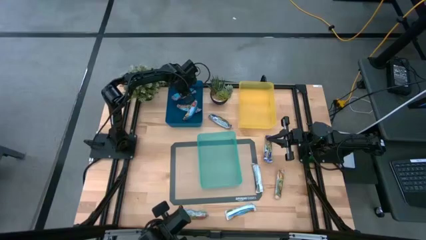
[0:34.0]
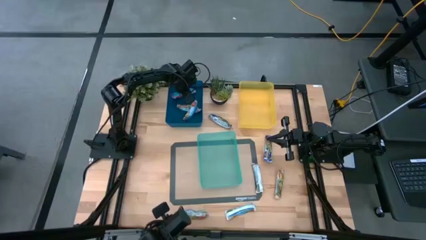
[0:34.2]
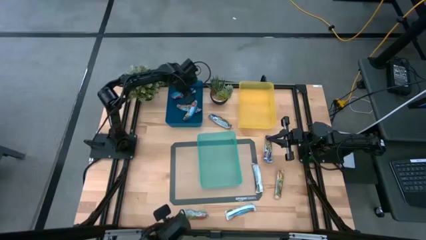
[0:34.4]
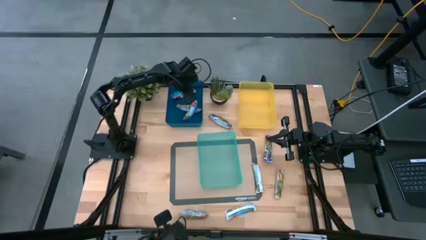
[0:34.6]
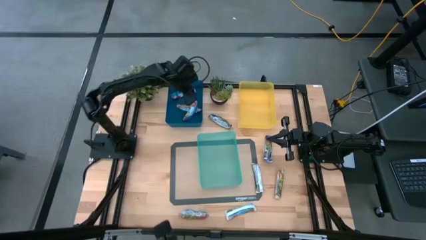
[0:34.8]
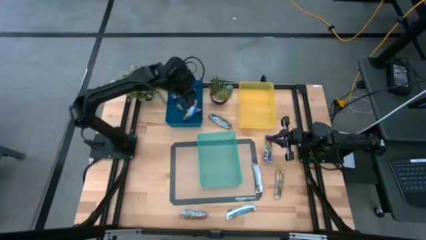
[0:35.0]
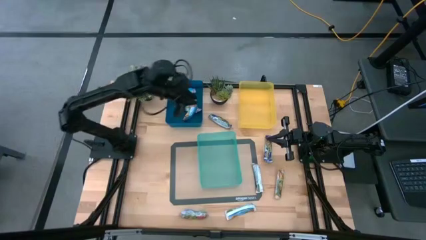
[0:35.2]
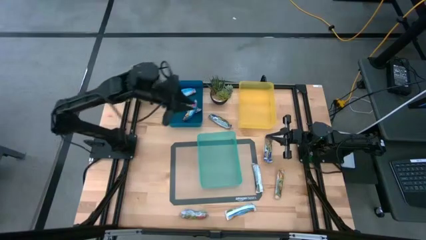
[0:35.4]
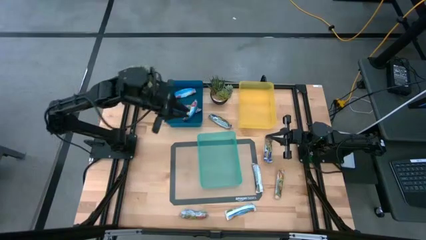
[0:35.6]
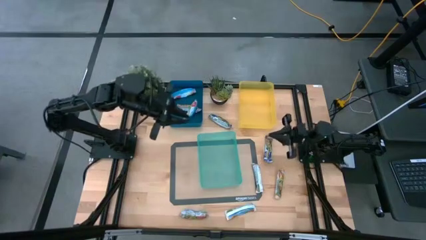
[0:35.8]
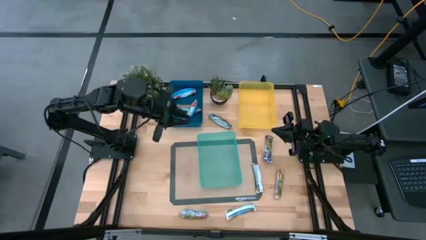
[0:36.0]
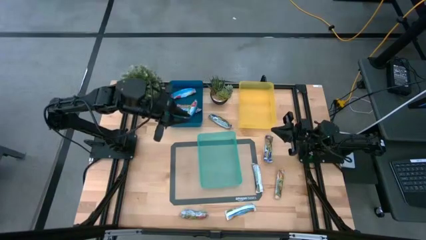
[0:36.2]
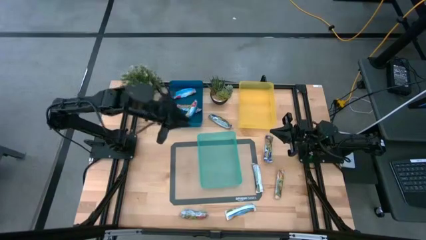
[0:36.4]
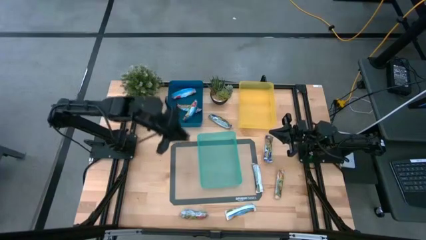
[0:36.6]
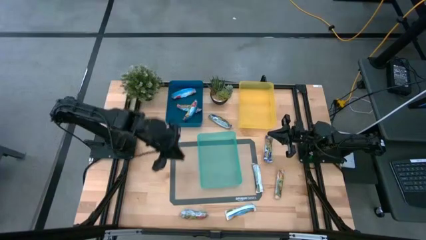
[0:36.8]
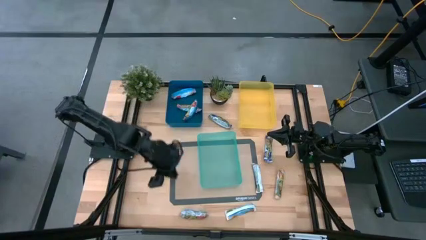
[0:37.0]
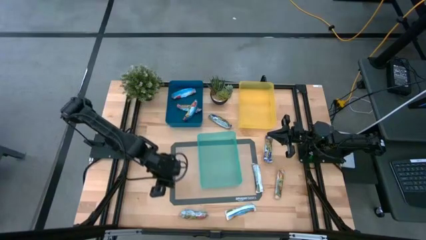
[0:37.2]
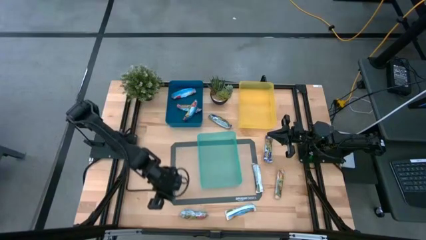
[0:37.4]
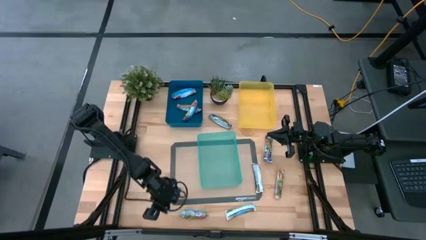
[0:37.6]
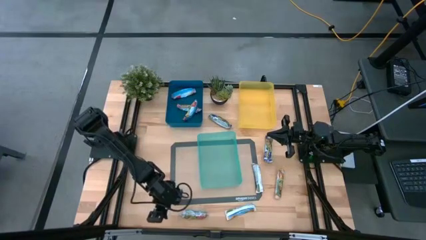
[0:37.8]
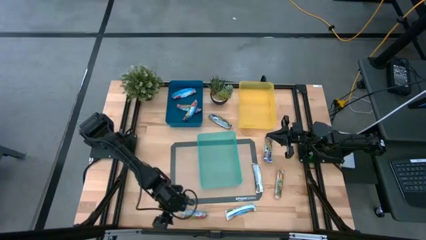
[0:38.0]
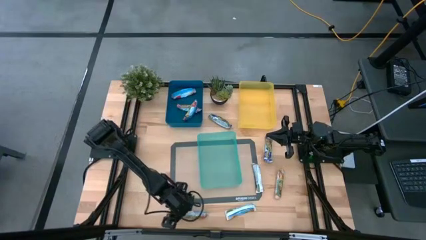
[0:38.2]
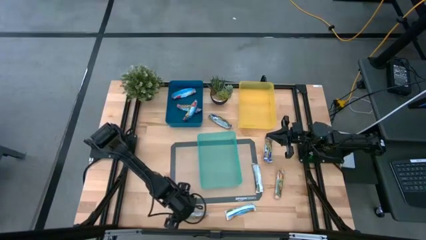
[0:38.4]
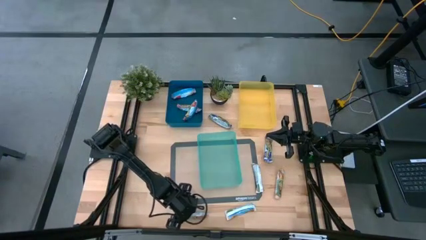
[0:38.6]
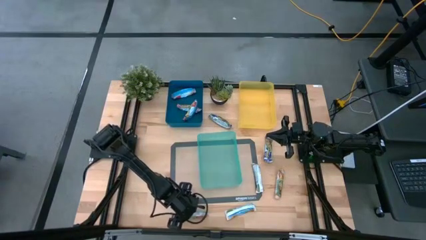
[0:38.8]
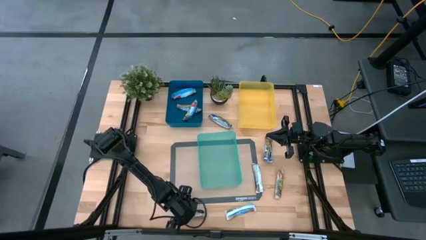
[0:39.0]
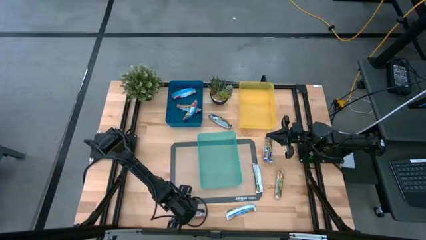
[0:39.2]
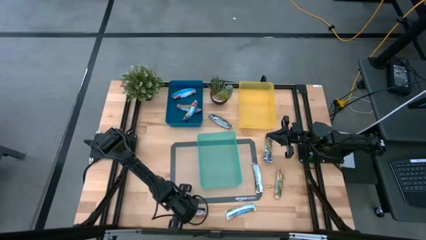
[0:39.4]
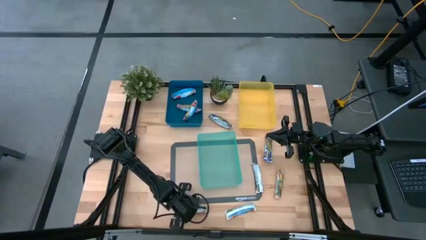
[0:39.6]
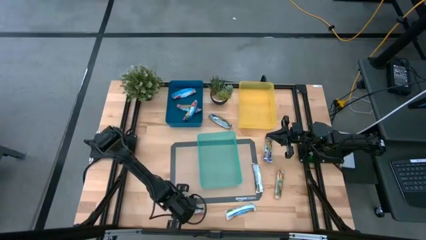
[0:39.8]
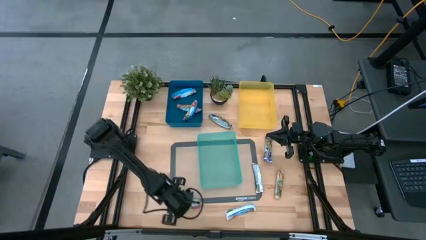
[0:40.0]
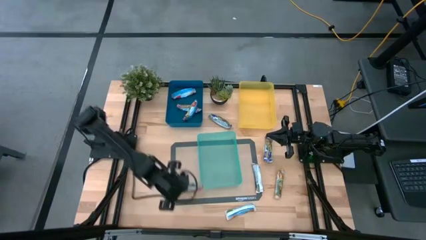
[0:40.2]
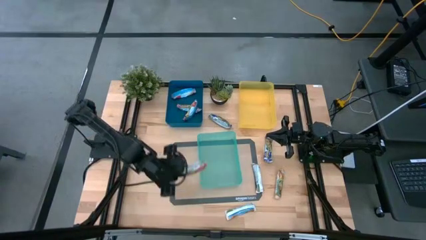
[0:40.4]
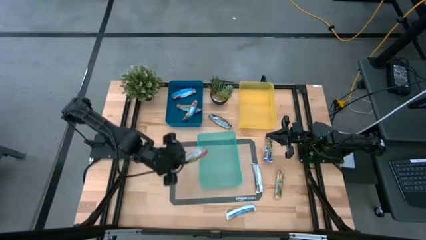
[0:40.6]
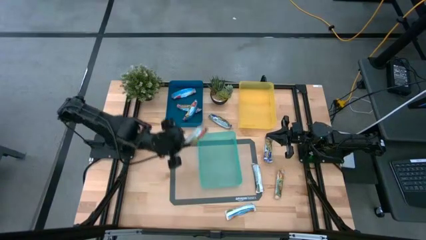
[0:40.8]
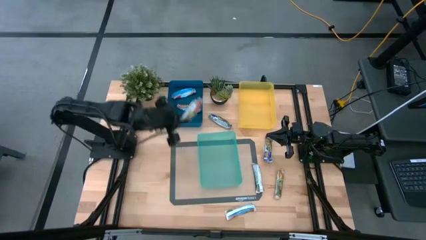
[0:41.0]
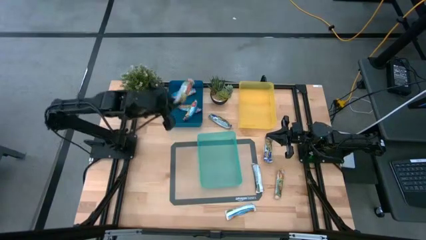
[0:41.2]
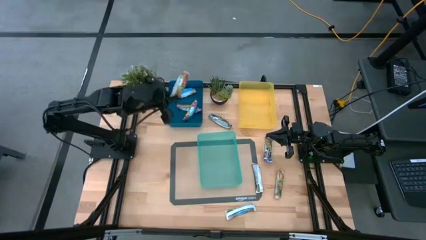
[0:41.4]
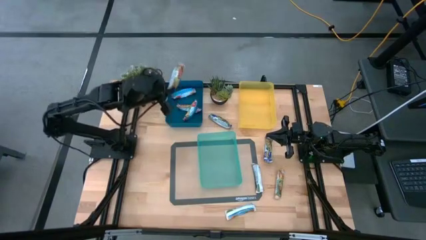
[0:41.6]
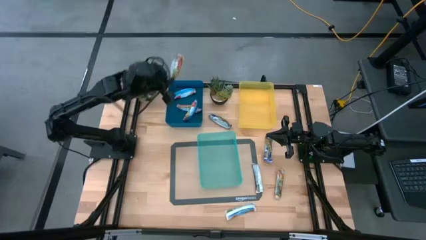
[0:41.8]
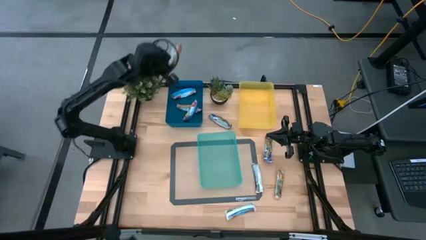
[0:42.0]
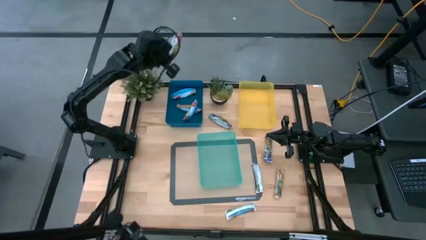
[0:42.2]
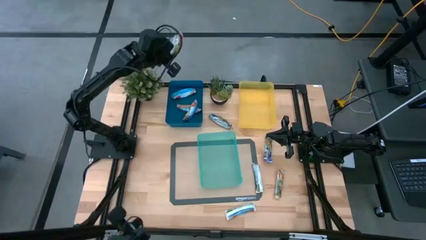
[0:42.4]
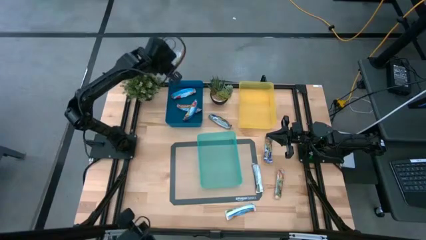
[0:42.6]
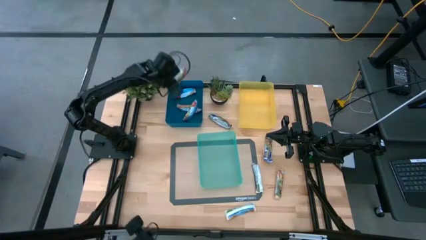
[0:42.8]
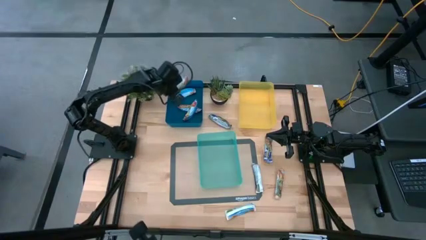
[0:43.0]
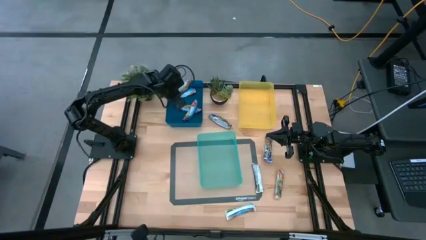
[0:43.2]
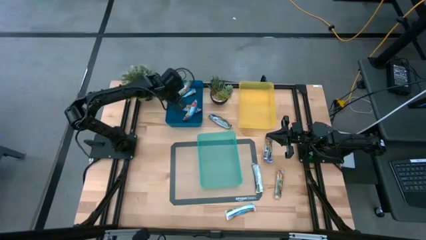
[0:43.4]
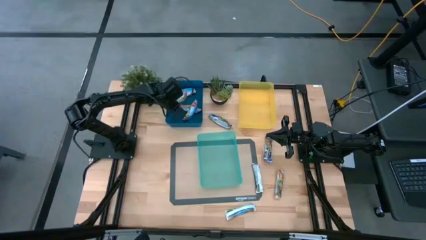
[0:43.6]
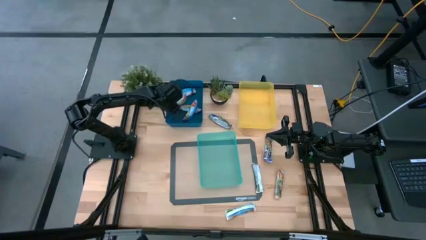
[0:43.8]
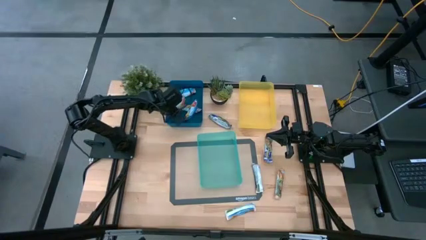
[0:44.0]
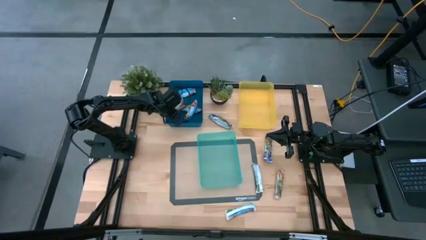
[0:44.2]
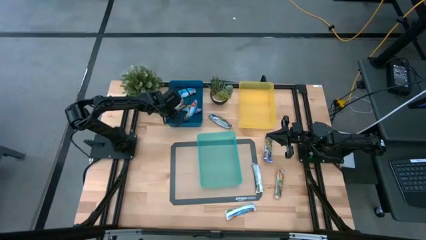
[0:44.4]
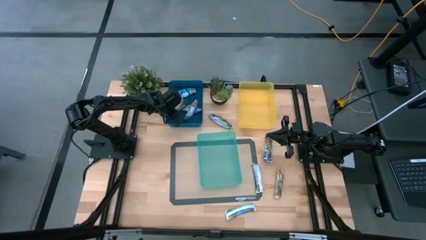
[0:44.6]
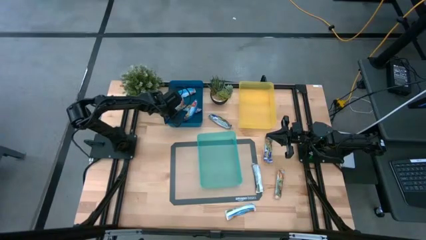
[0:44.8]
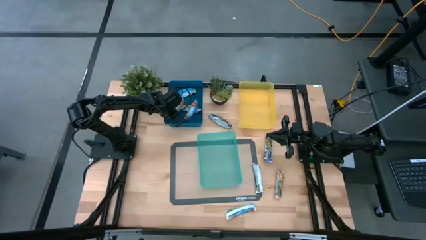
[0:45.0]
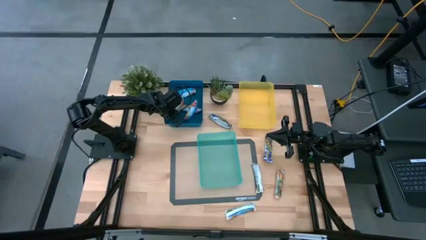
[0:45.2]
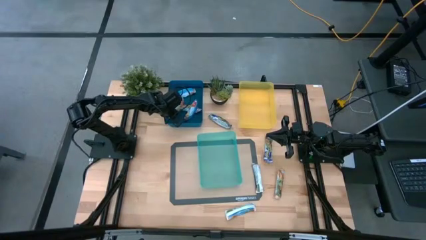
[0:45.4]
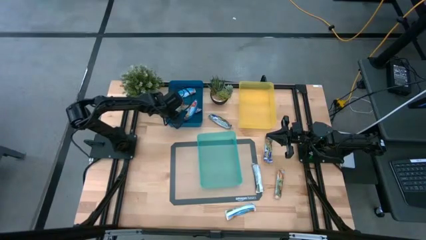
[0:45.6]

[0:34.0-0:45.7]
Task: Pick and place Granola Bars by type
Put the red granola bar into the dark blue bin

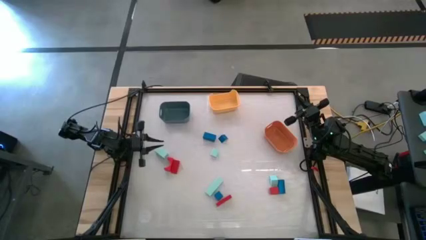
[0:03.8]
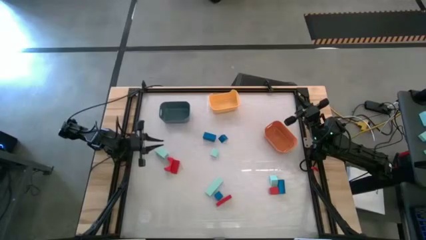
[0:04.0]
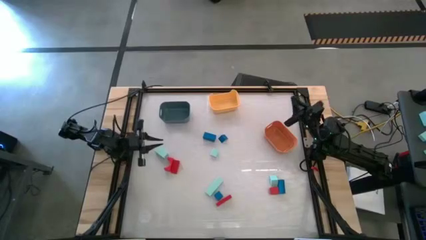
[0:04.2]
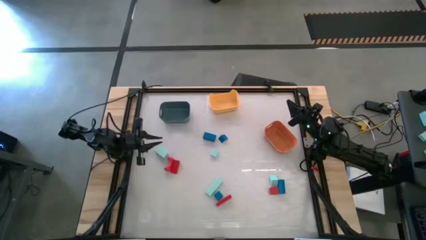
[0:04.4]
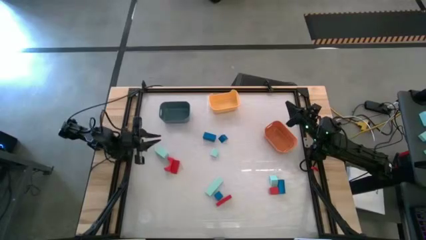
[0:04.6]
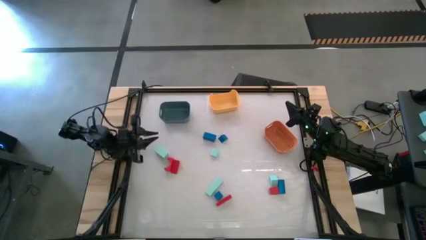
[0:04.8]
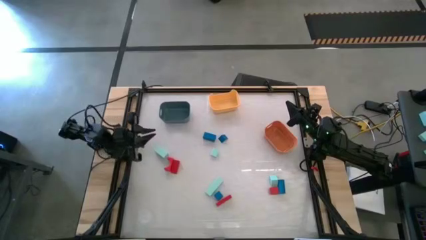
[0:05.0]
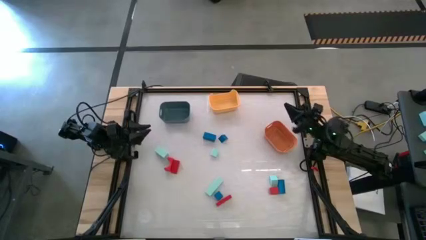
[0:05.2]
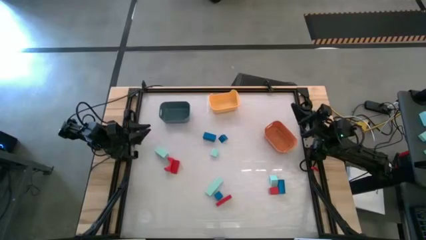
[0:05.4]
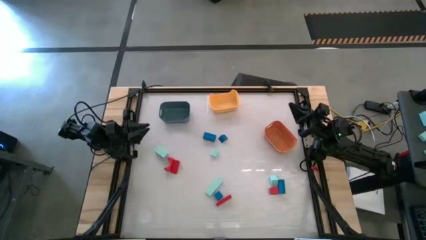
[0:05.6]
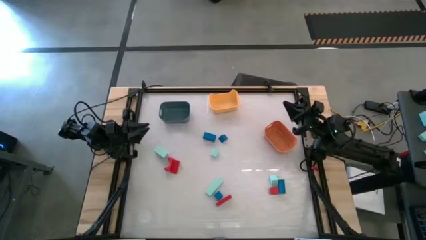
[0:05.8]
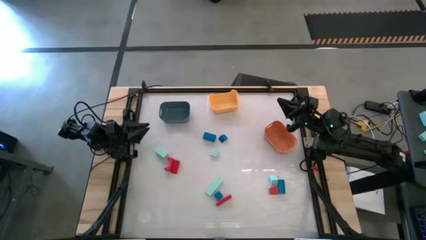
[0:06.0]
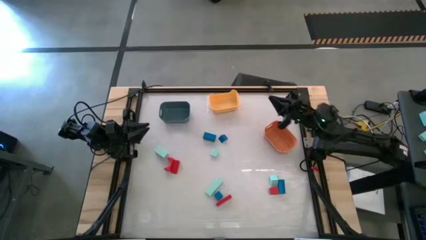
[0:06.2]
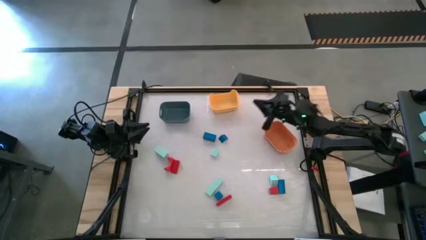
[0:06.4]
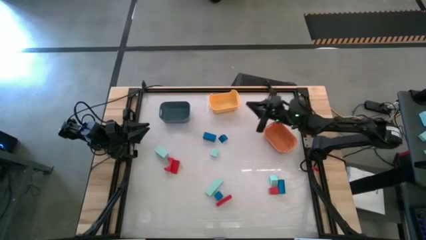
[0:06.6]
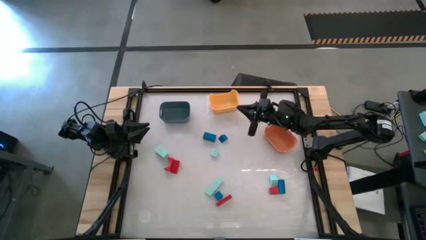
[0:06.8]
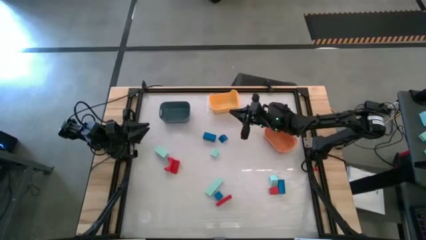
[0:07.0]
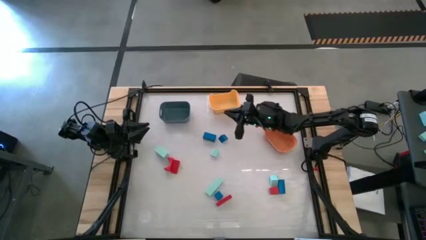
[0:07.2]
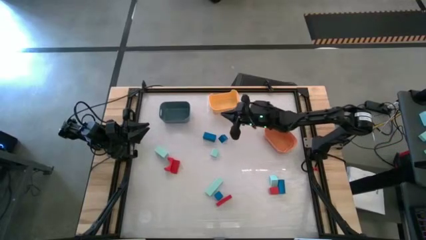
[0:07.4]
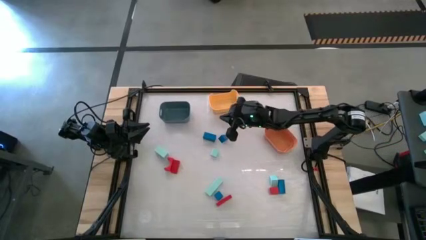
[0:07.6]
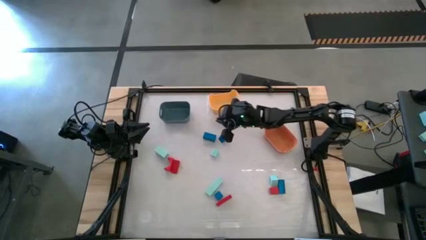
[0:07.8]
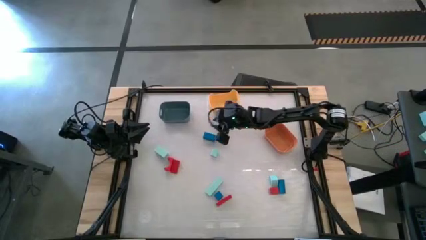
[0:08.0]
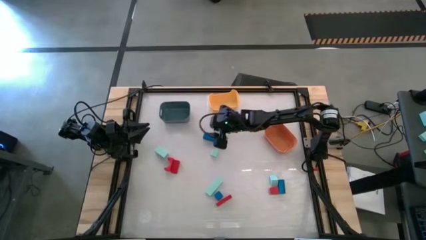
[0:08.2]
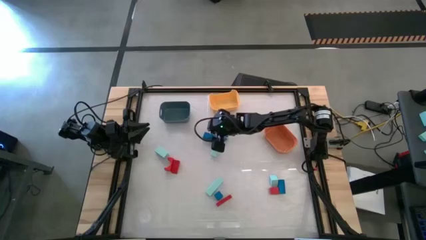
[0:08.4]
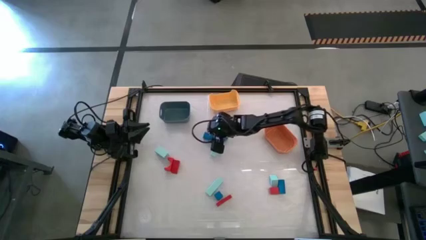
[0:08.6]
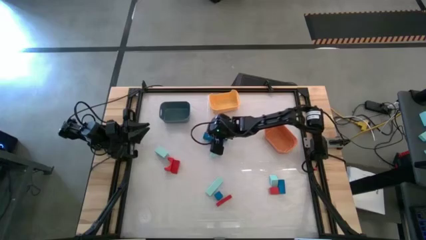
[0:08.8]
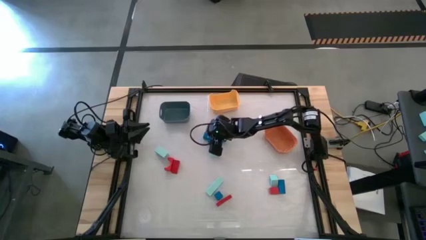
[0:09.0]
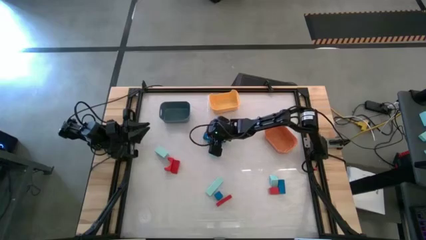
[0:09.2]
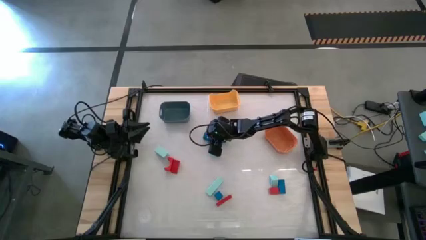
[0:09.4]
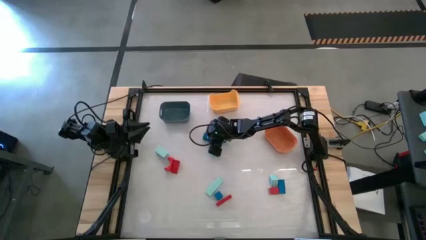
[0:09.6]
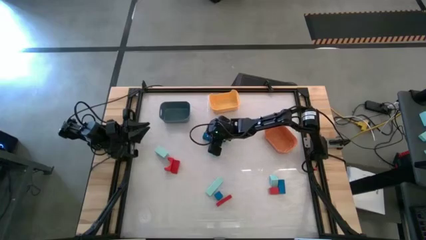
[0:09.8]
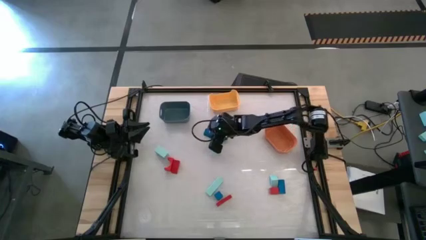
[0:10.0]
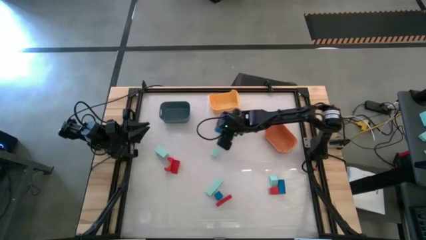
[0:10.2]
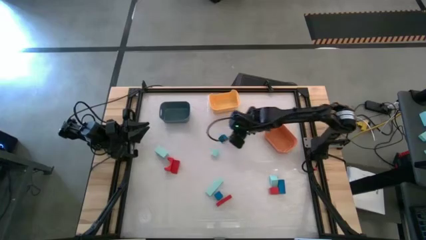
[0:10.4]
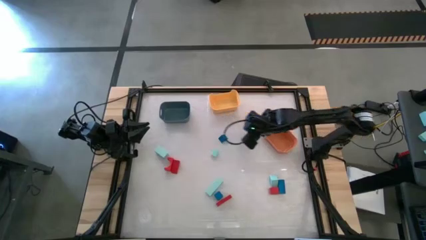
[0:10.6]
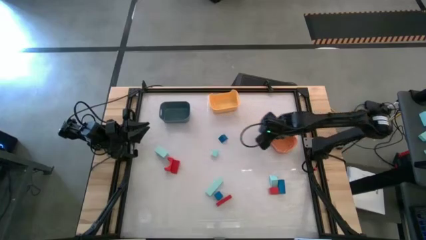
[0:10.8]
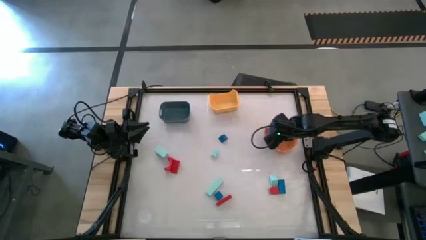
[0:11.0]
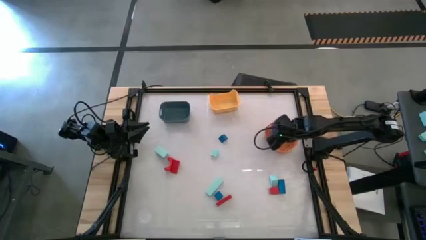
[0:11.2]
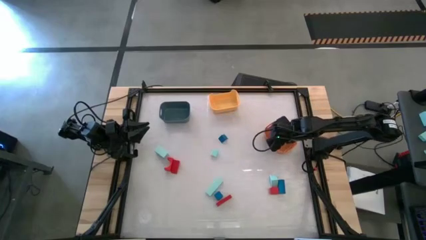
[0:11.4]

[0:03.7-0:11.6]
Task: Sort & place blocks by color
Put the blue block into the orange bin
